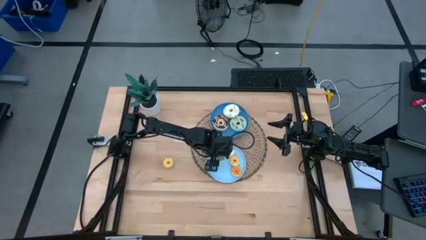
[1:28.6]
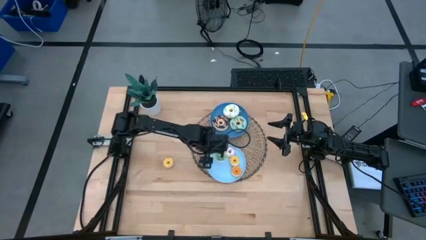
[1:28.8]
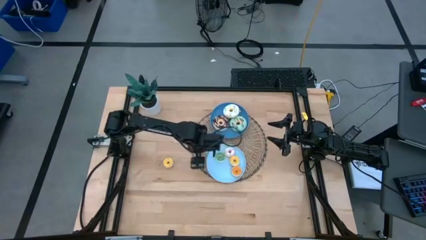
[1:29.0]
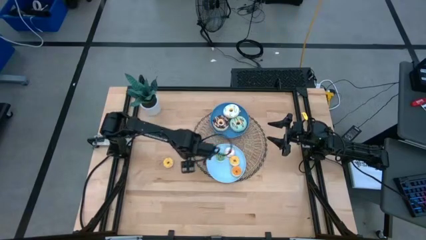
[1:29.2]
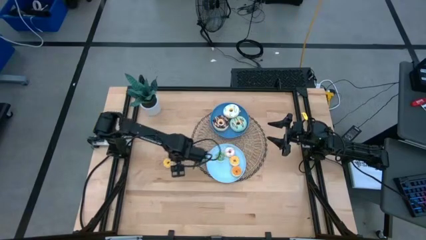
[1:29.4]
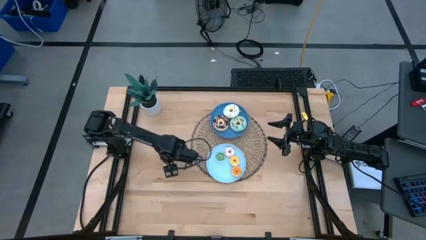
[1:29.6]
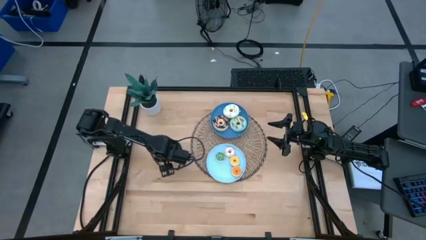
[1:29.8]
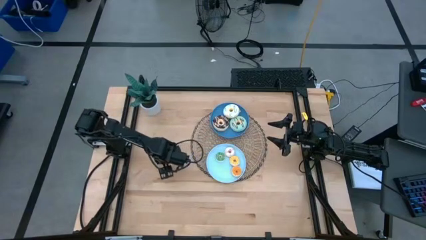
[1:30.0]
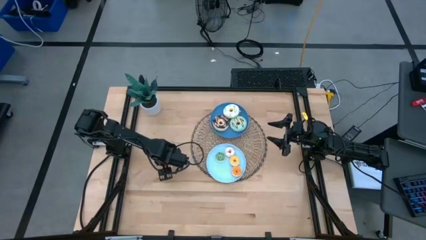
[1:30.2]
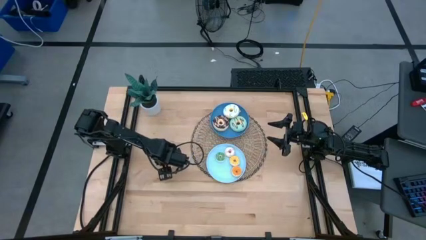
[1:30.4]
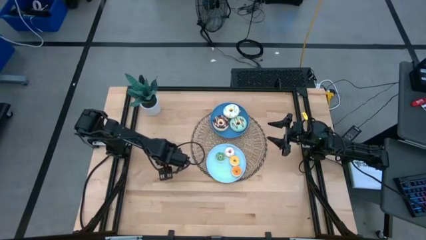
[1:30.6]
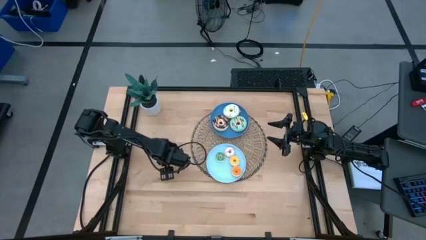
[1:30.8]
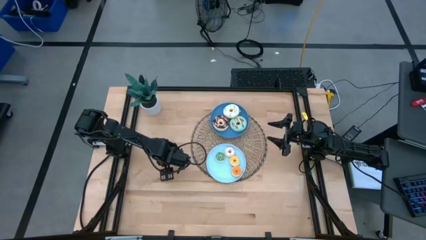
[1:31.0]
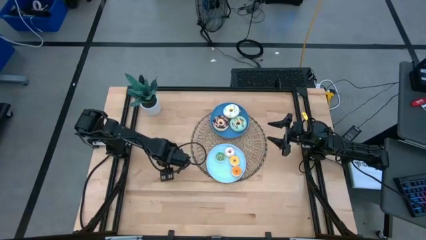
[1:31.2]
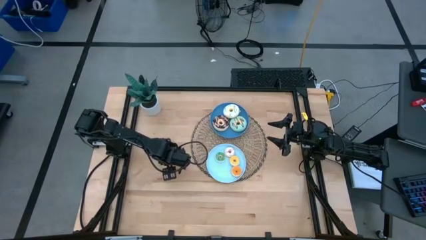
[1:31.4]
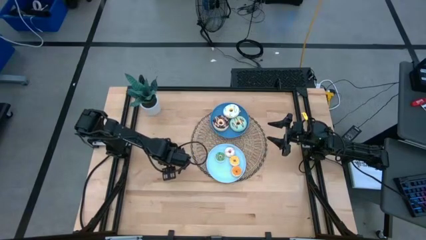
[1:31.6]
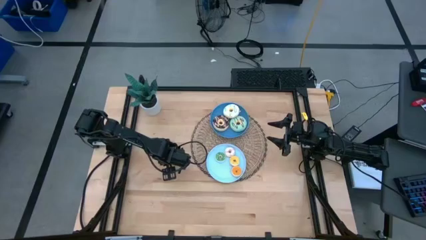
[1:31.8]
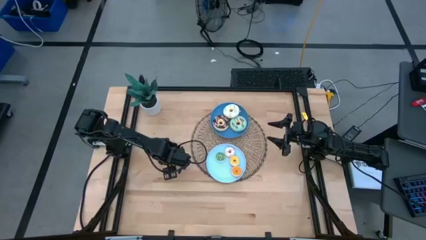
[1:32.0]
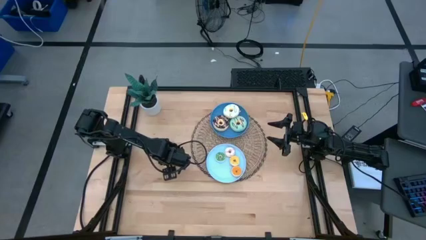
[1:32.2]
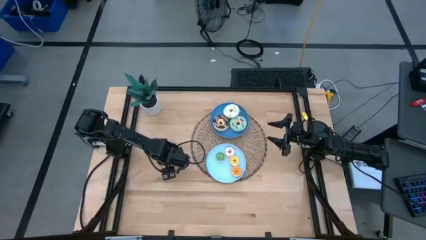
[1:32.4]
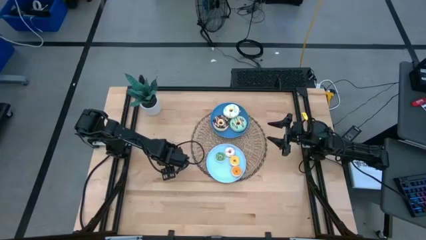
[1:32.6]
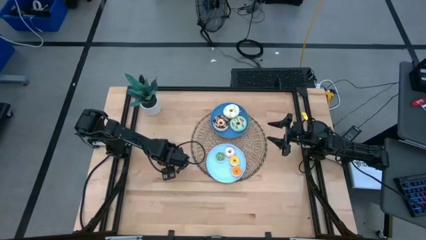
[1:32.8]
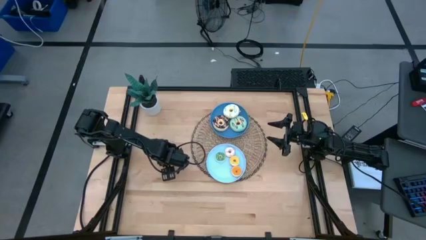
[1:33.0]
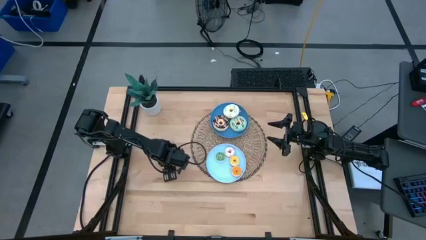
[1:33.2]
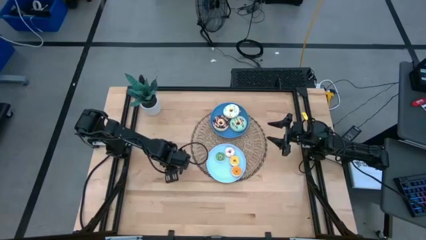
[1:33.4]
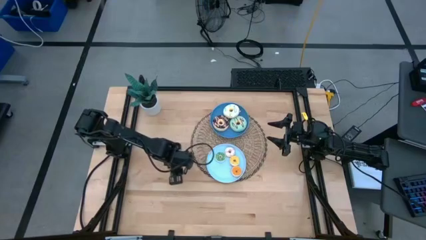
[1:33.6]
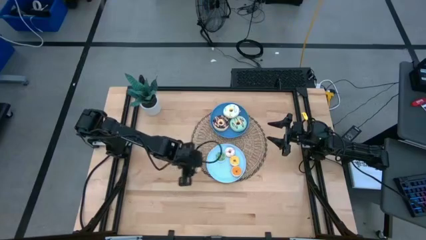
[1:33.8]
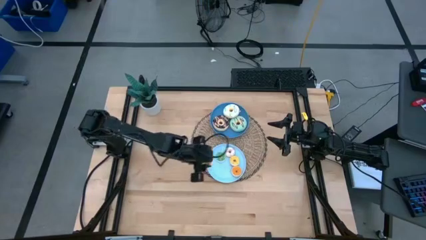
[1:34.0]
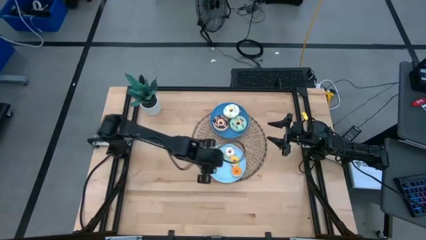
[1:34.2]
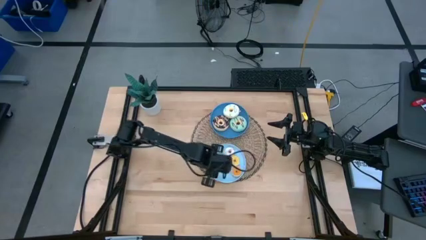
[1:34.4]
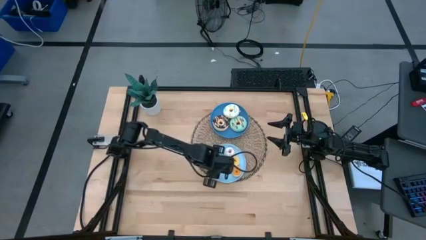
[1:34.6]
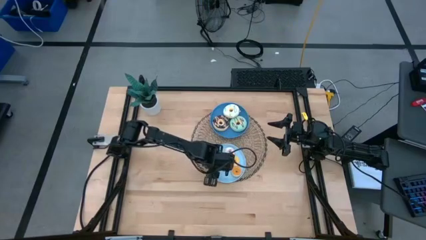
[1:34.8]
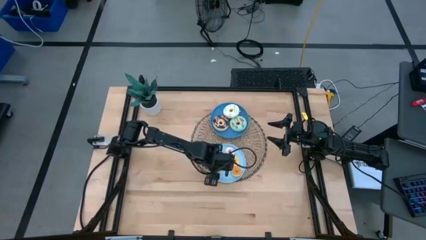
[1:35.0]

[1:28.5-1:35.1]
Task: Pick & Place donuts
Put the small yellow donut on the light blue plate

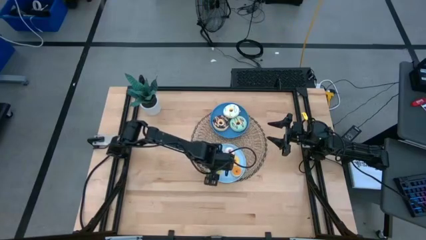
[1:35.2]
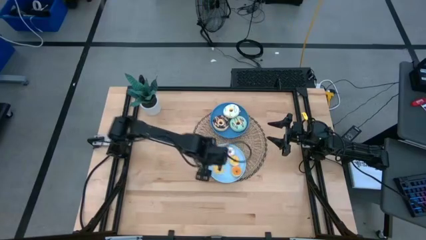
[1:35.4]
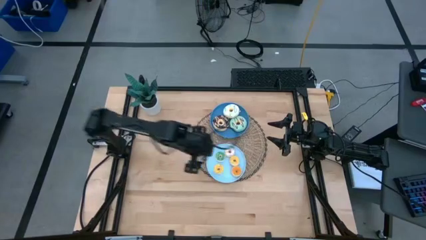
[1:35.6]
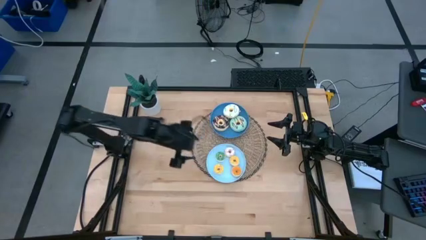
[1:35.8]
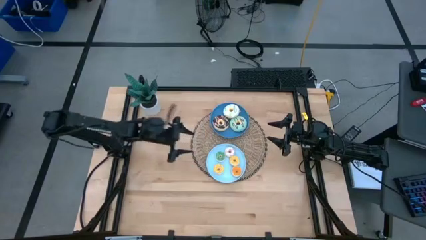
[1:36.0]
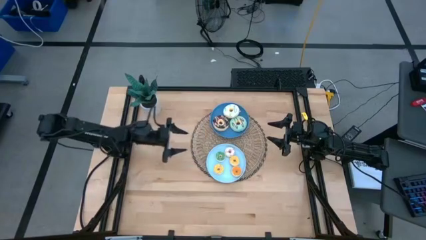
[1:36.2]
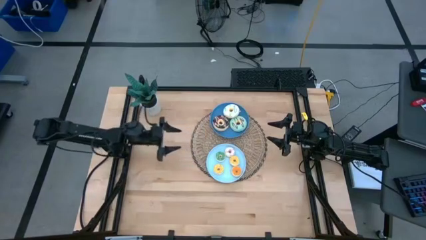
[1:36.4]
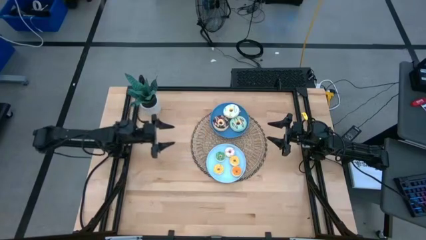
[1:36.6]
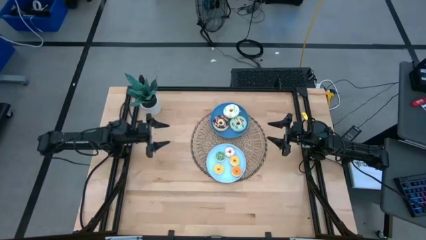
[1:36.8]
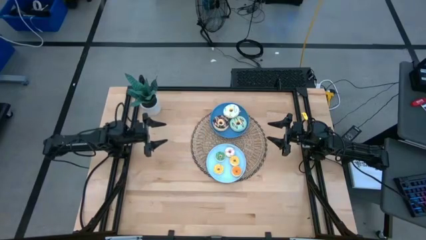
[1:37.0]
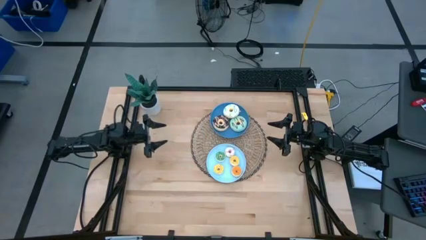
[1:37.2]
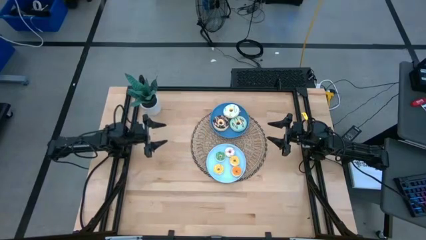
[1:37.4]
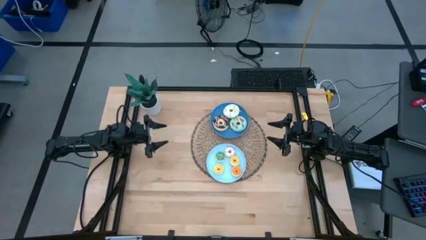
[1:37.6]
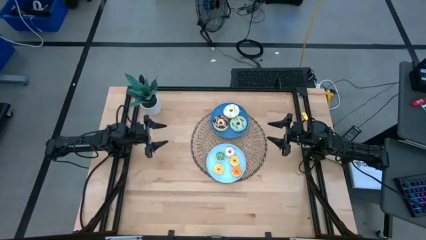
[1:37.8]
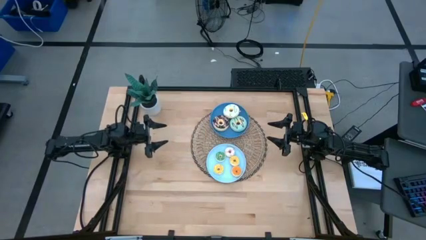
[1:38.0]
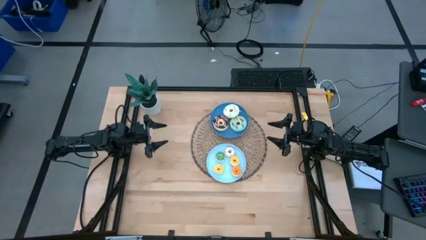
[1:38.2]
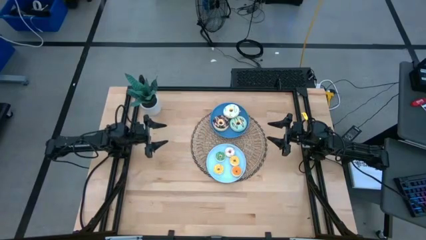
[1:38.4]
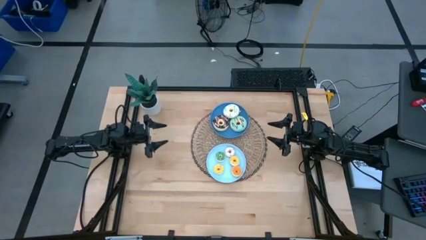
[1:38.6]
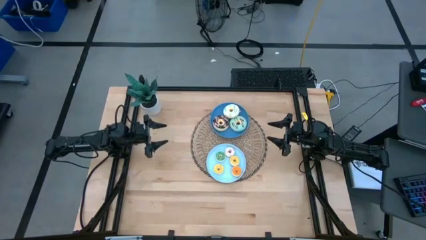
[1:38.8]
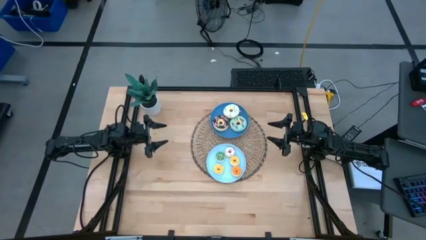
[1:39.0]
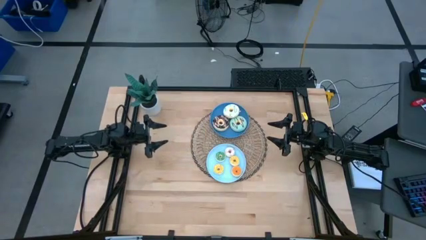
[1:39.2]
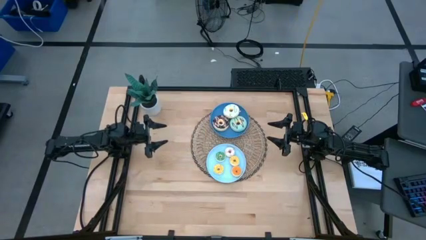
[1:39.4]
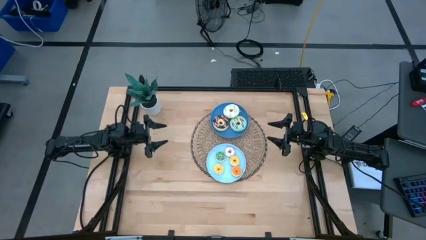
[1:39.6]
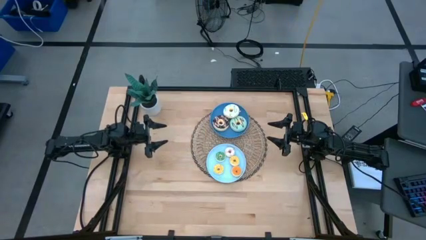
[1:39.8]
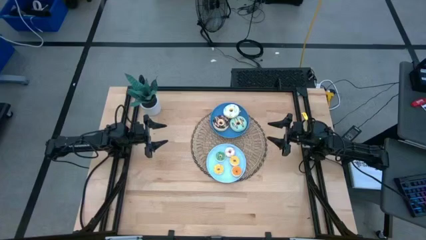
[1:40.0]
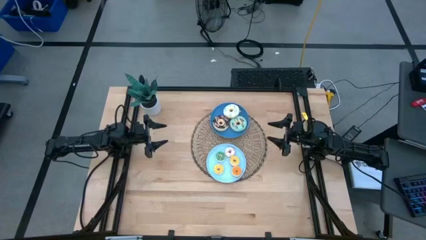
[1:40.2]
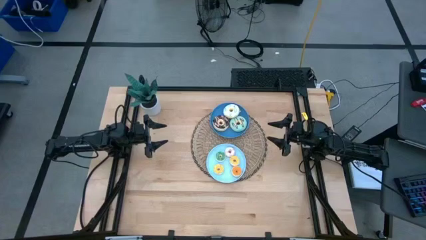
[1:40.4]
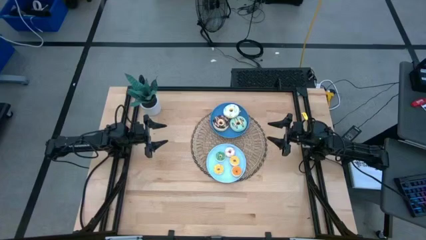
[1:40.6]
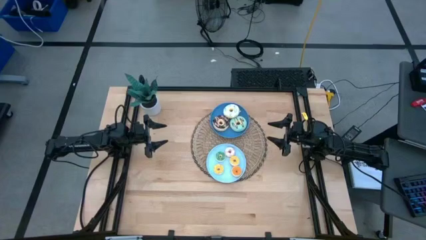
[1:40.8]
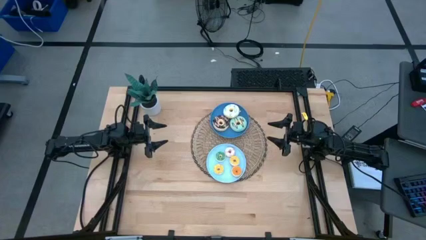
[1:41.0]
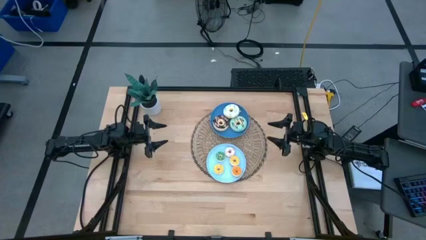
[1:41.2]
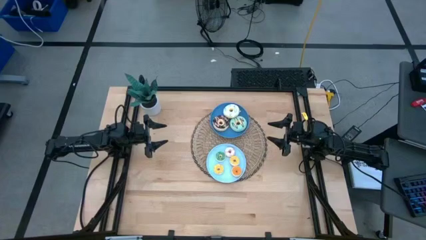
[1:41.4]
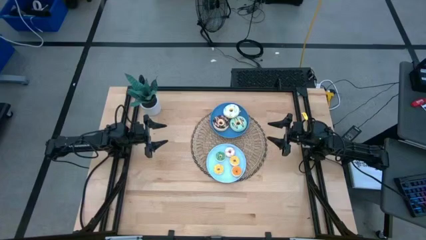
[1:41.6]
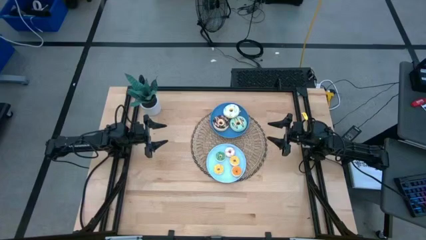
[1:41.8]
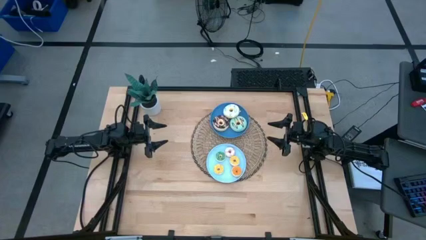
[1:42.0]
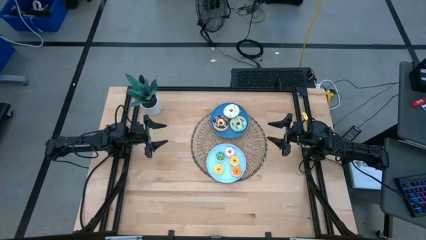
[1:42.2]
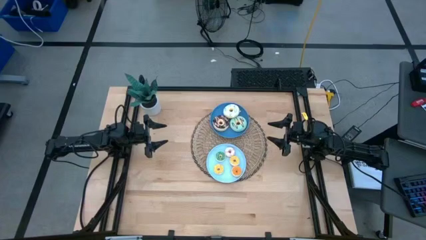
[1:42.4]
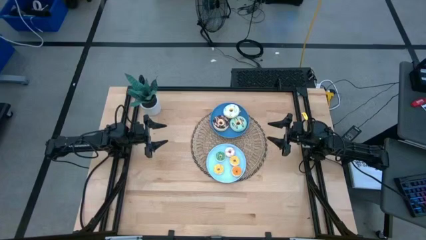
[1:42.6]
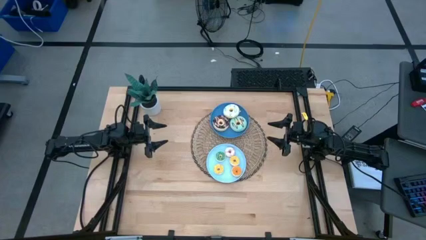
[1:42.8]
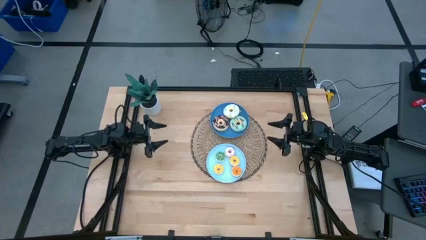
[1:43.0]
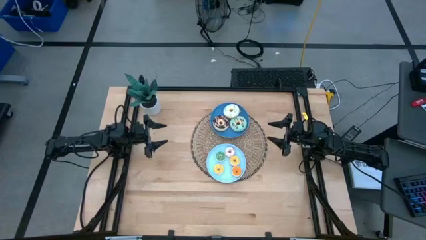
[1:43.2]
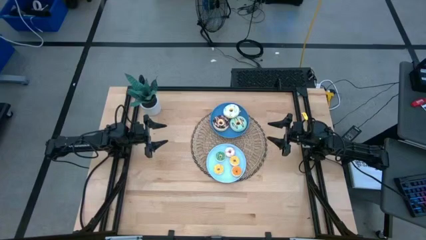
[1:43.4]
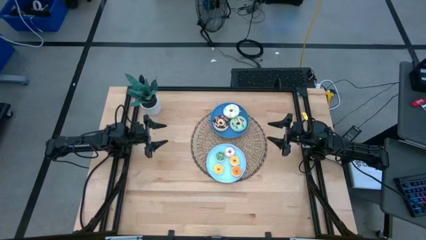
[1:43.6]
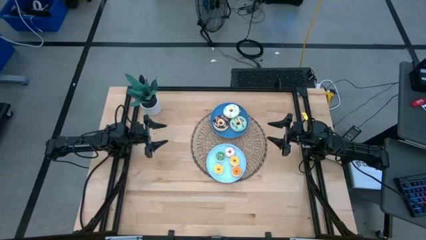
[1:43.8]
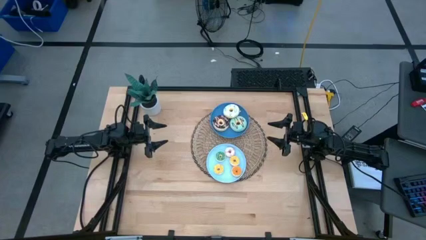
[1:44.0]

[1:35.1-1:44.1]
Return to Home Position
